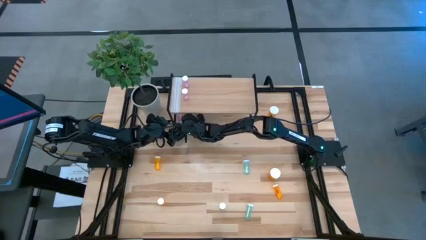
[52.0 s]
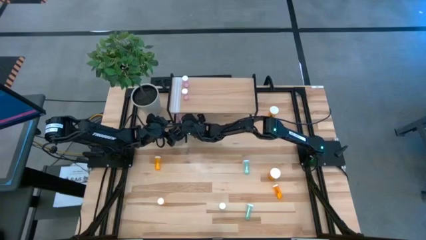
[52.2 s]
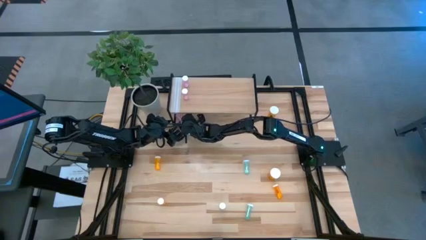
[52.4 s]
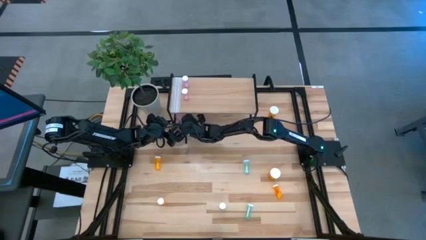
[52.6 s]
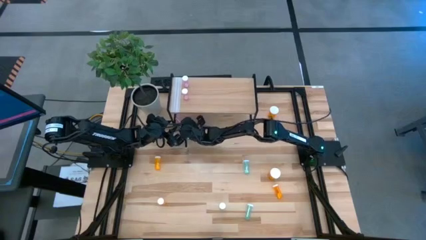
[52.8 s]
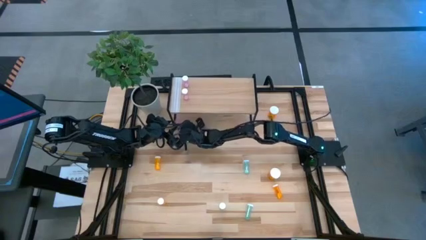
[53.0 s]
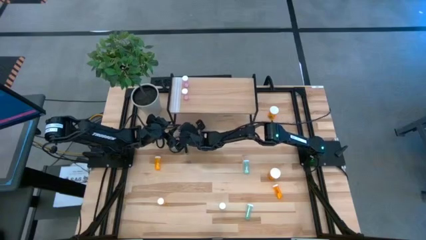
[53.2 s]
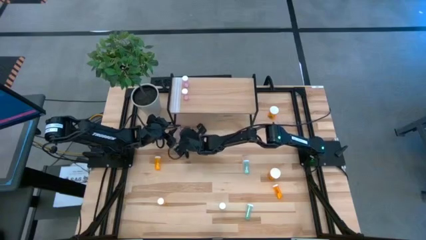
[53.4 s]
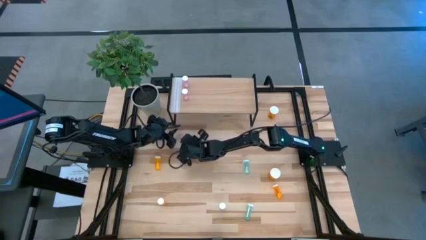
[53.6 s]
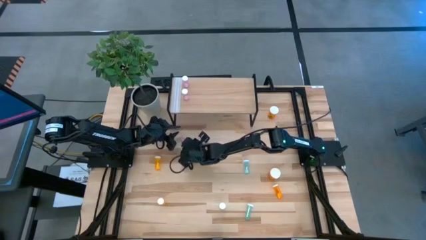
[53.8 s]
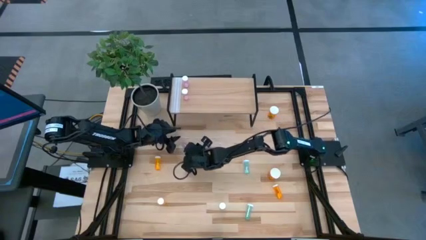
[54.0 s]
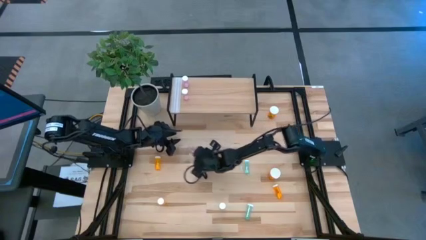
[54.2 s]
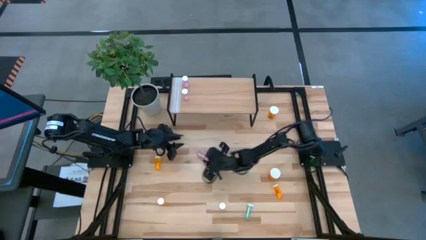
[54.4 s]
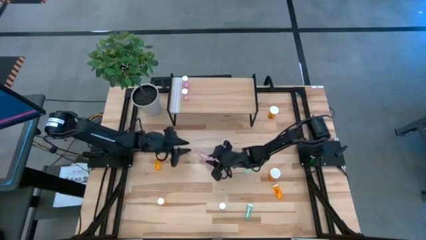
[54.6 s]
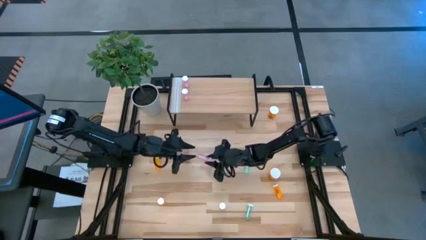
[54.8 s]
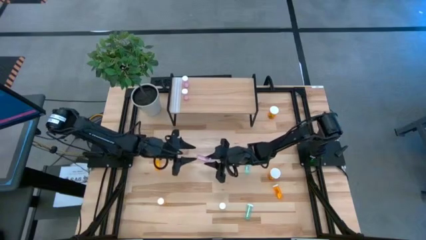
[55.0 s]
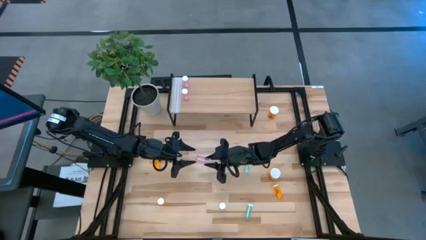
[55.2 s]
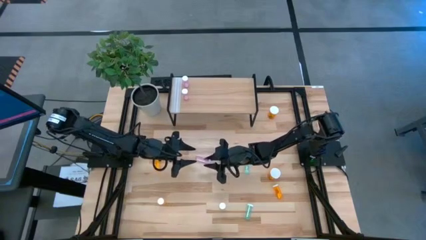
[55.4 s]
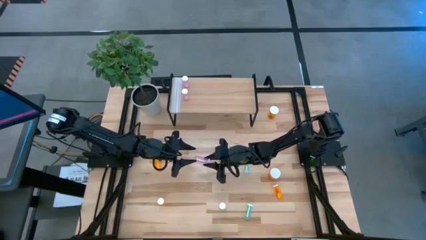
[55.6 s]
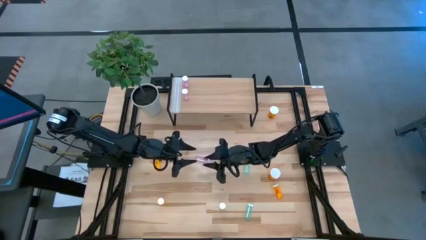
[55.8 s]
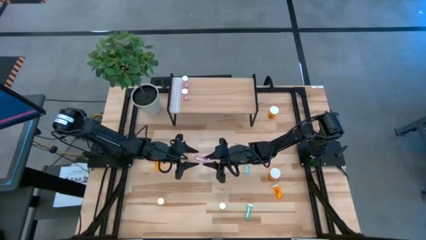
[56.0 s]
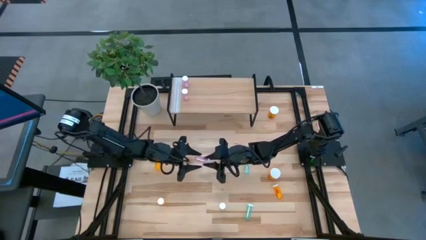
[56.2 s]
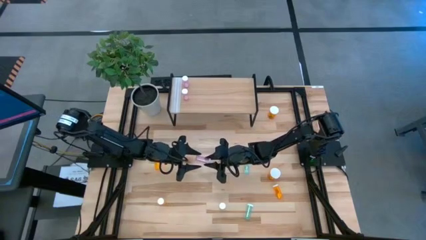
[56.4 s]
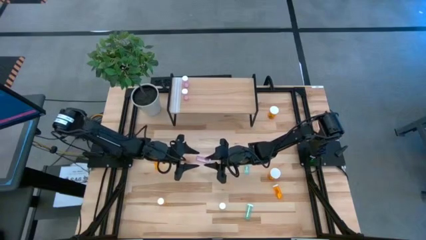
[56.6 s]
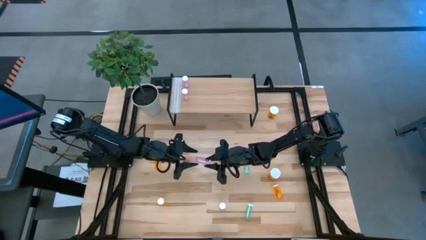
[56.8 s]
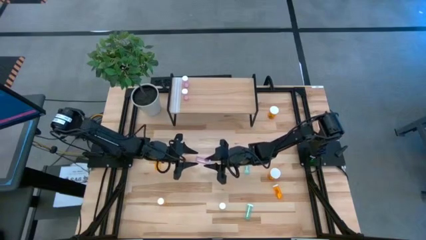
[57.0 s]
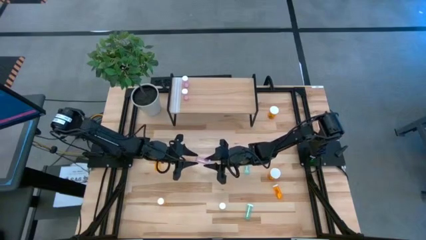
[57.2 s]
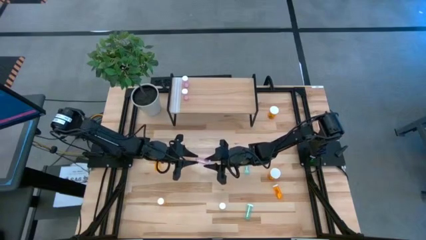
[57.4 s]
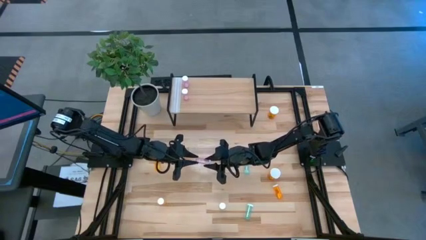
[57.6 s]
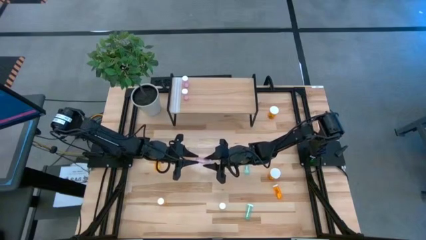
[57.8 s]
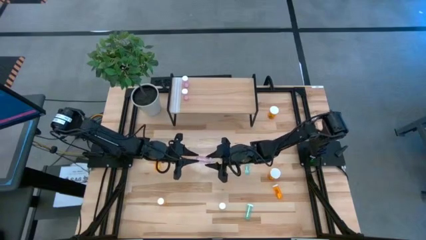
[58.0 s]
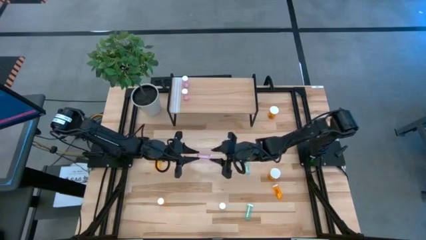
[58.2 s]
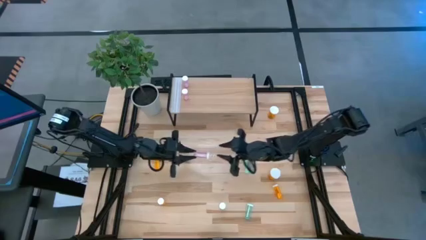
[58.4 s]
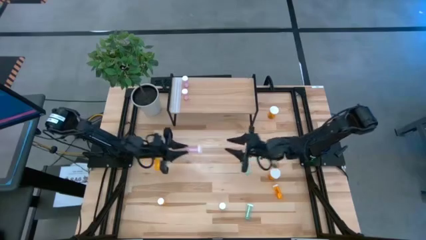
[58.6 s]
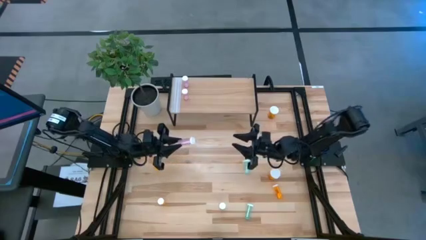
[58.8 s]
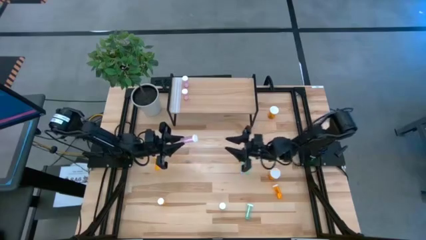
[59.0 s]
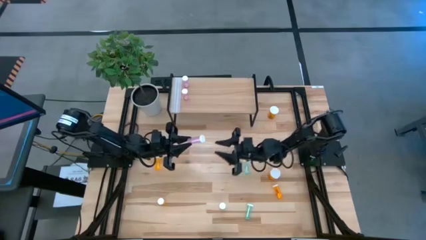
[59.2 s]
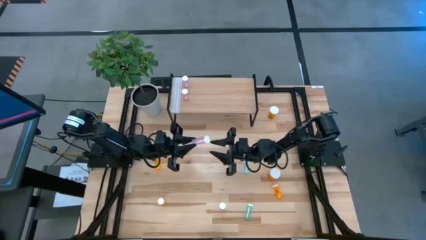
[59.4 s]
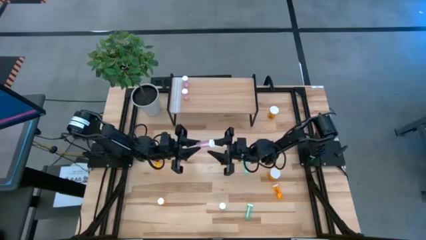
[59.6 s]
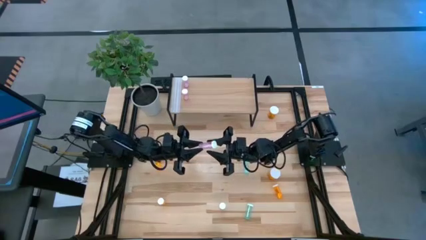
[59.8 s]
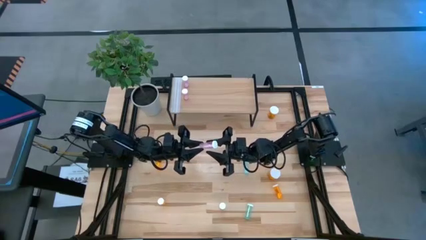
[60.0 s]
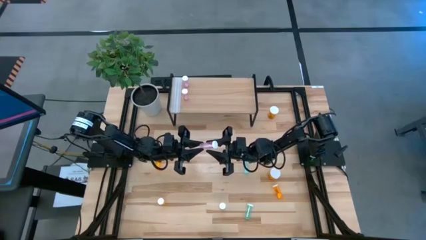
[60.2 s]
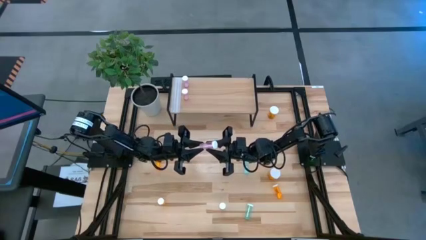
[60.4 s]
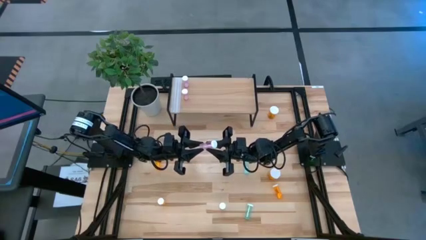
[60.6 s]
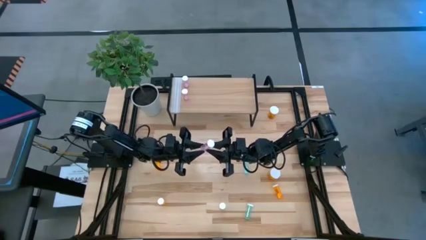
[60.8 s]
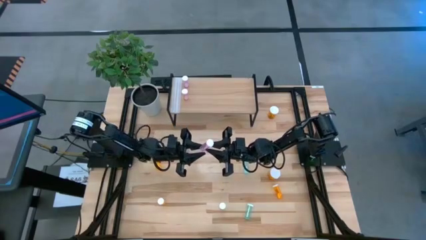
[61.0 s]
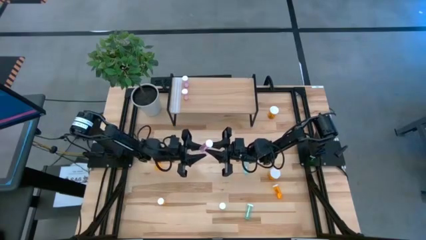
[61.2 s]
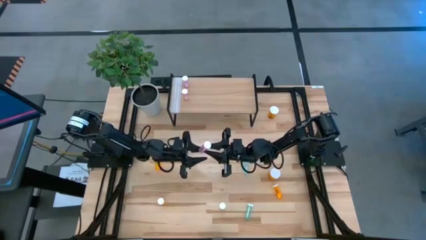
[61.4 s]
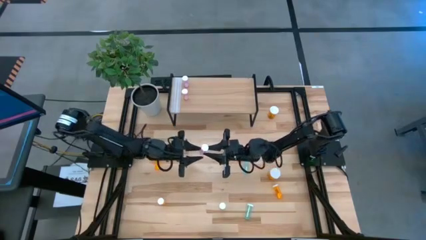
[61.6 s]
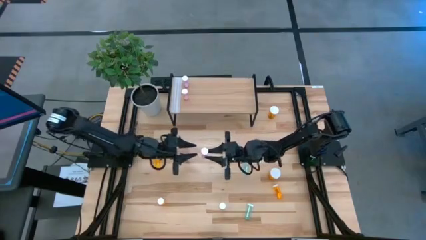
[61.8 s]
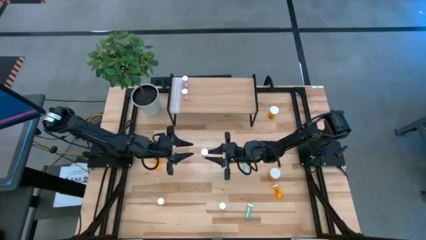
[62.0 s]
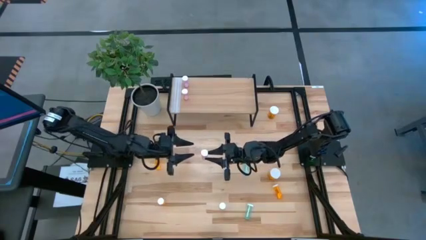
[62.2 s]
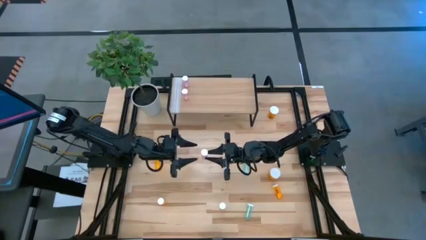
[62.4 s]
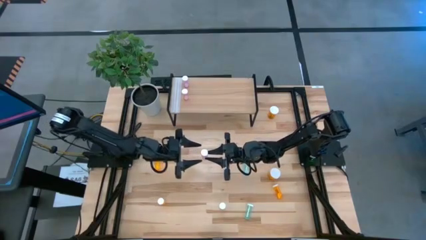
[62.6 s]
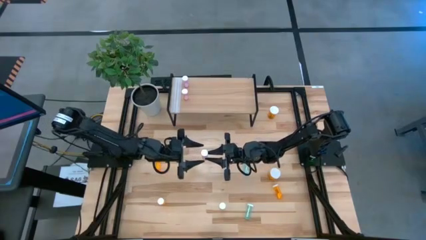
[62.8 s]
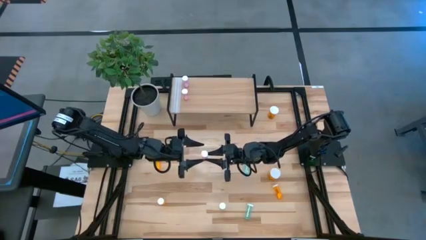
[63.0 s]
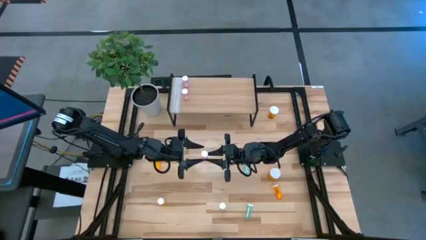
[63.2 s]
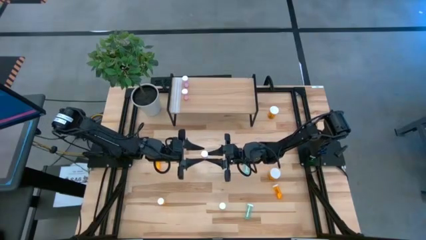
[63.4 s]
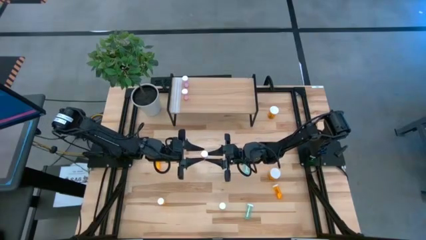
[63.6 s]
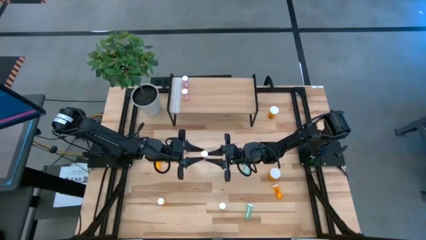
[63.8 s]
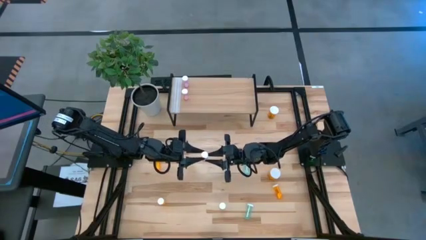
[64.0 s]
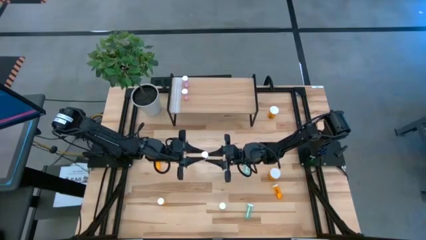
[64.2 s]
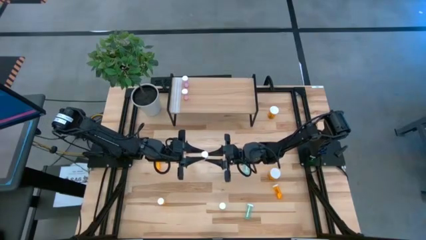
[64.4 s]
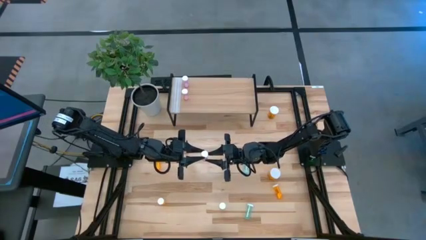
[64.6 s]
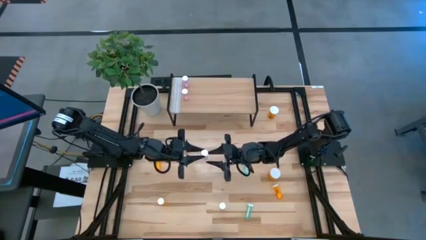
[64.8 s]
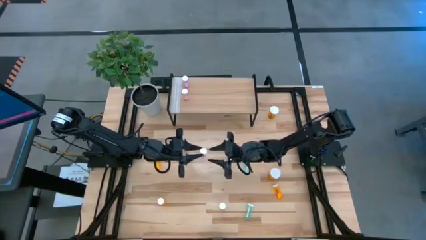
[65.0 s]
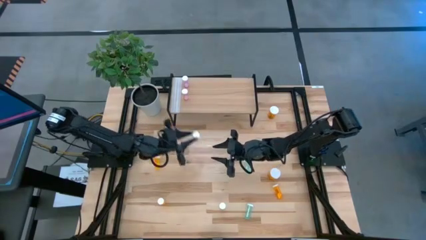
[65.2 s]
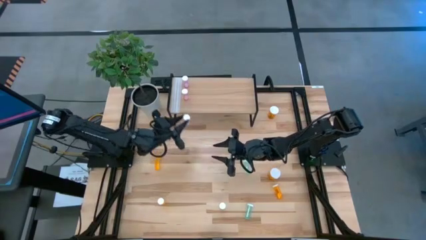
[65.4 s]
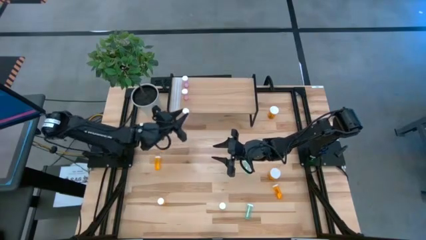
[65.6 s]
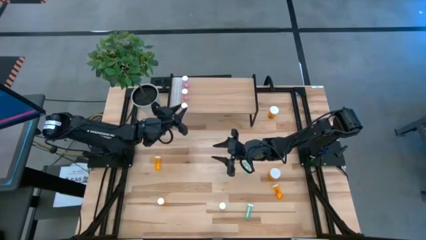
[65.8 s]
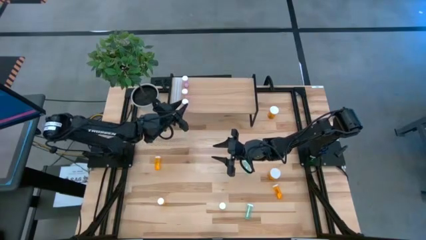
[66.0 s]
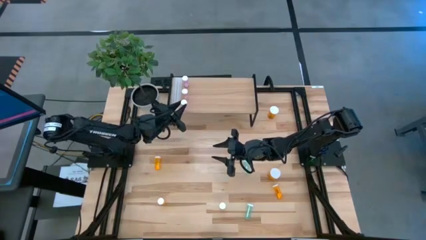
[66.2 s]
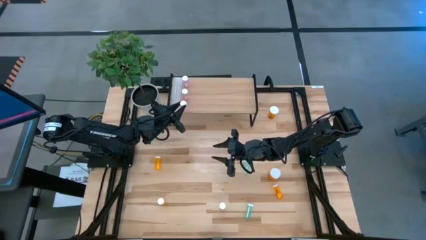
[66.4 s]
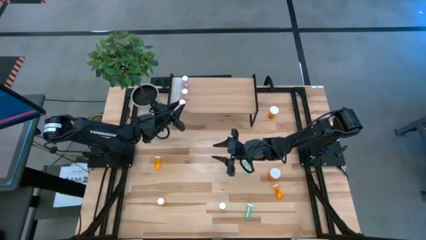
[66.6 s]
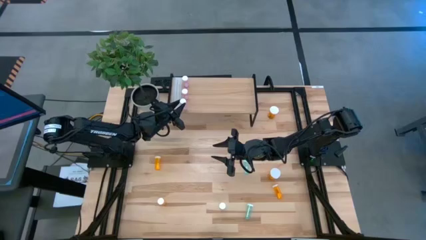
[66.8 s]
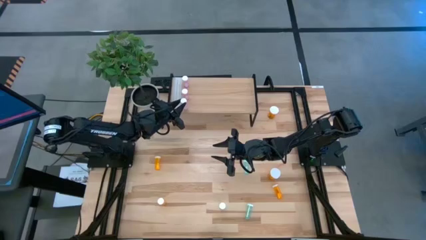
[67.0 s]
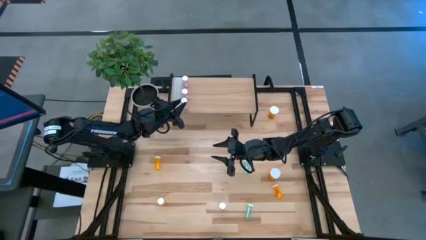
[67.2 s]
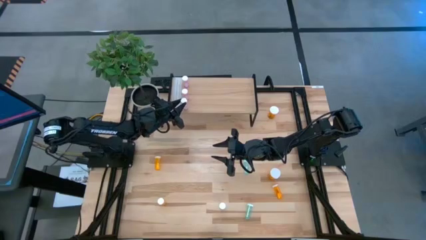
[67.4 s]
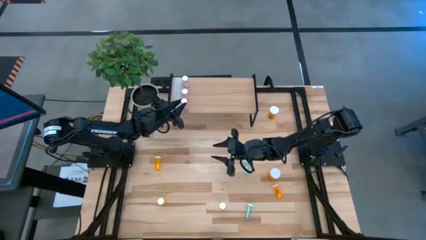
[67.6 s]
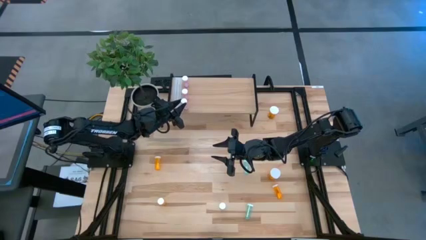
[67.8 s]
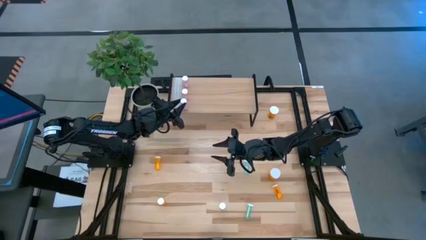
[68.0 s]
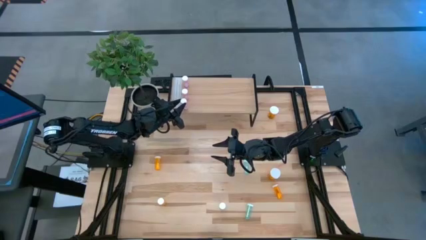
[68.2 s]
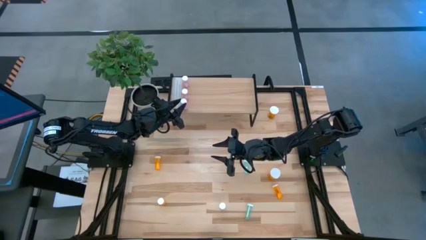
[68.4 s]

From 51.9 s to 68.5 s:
Task: Pick and place medicine bottles onto shelf by color
Put the pink pill bottle aligned with the other pink pill bottles on the shelf
